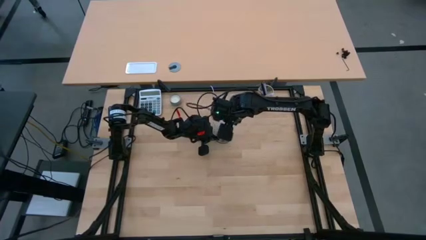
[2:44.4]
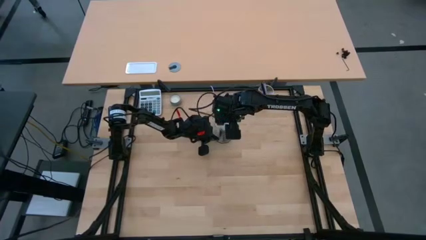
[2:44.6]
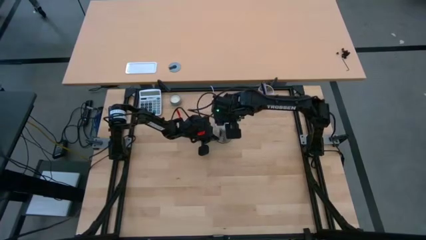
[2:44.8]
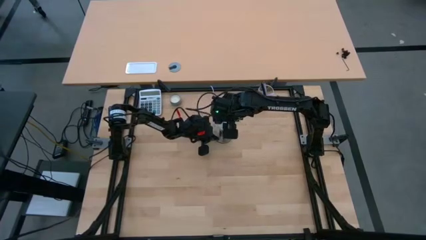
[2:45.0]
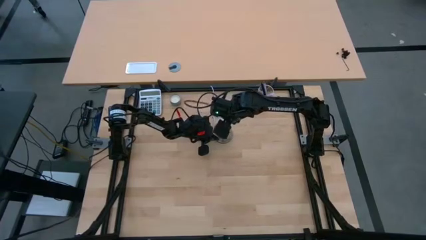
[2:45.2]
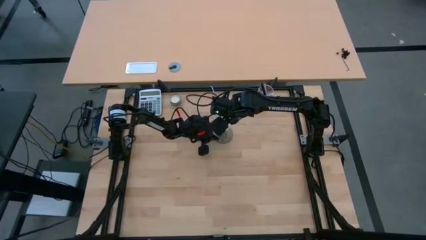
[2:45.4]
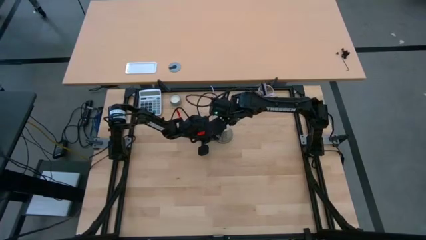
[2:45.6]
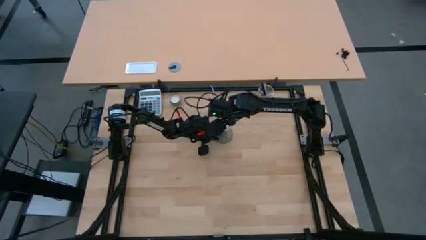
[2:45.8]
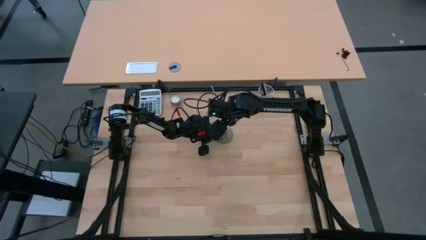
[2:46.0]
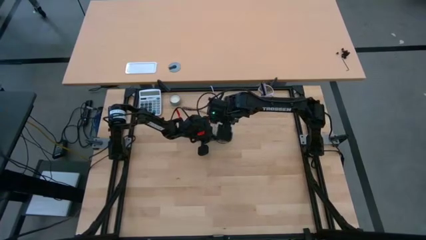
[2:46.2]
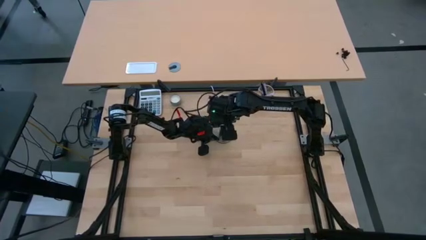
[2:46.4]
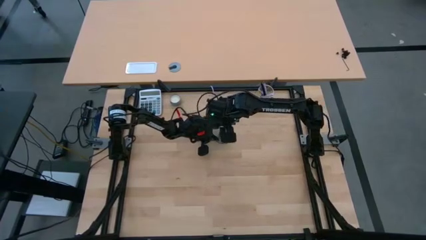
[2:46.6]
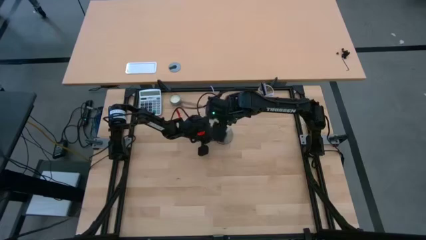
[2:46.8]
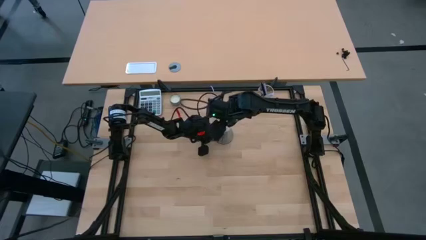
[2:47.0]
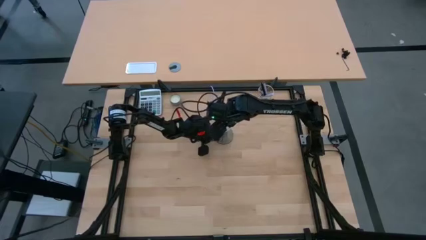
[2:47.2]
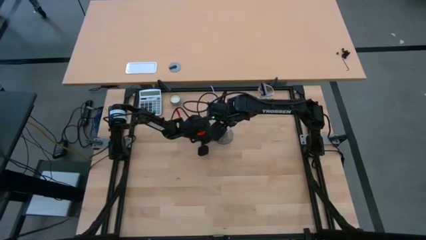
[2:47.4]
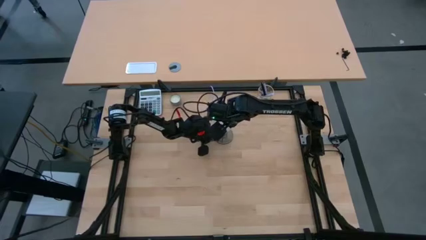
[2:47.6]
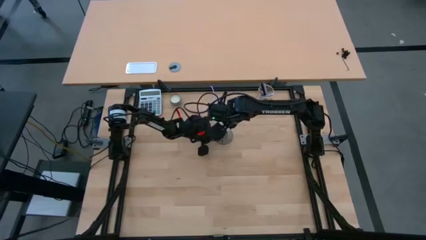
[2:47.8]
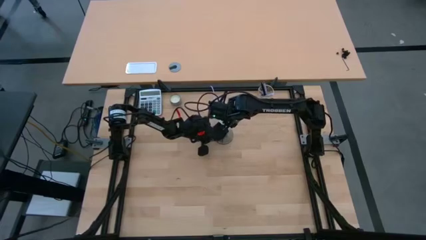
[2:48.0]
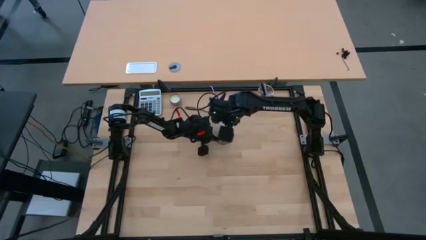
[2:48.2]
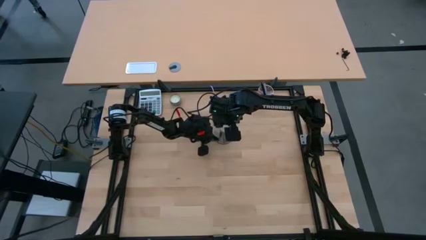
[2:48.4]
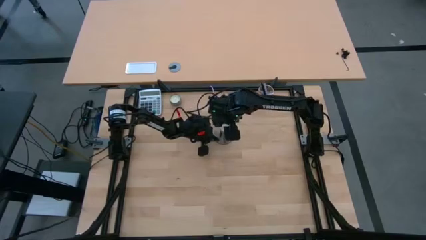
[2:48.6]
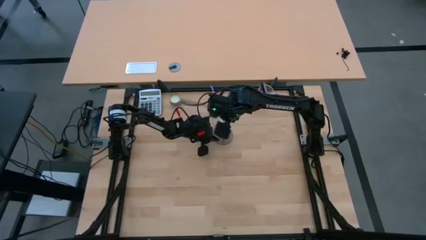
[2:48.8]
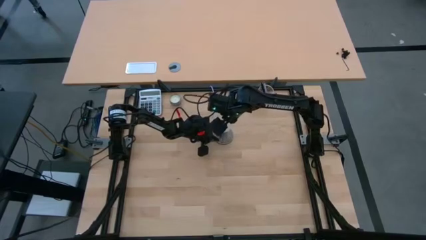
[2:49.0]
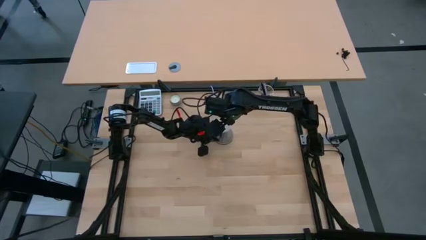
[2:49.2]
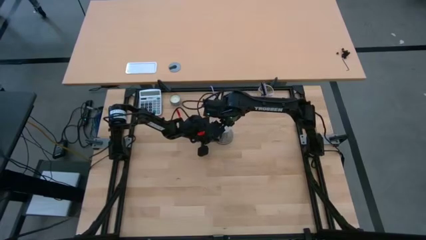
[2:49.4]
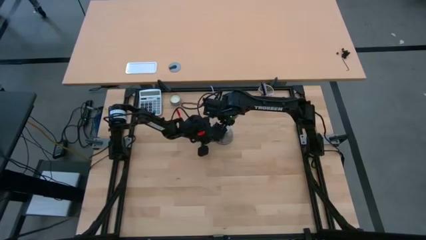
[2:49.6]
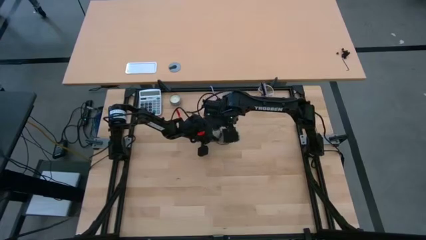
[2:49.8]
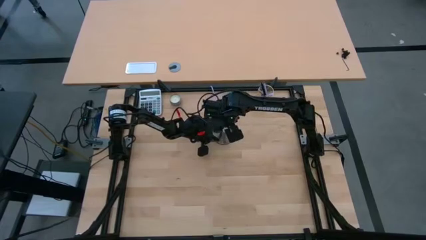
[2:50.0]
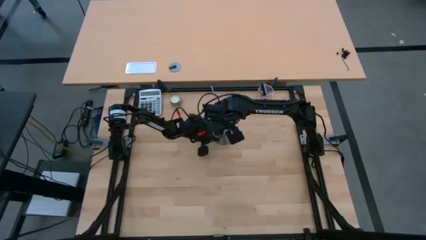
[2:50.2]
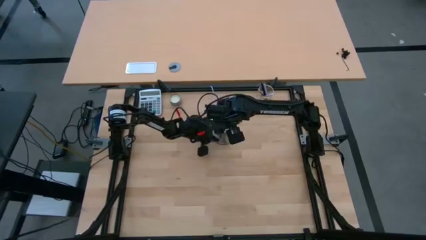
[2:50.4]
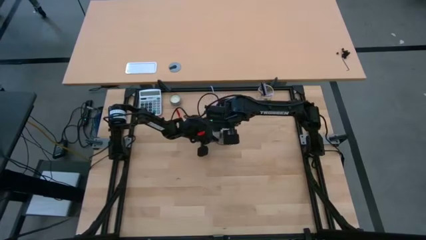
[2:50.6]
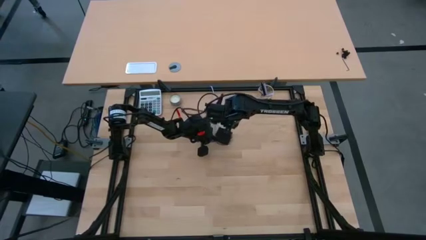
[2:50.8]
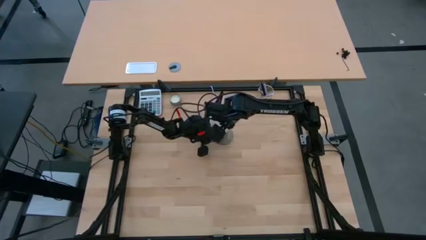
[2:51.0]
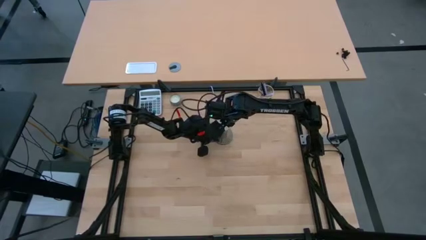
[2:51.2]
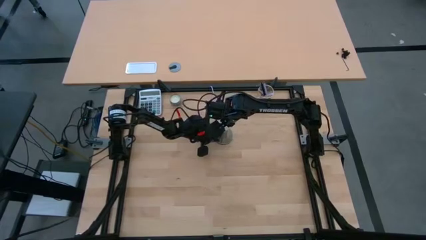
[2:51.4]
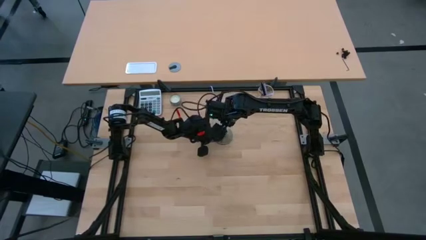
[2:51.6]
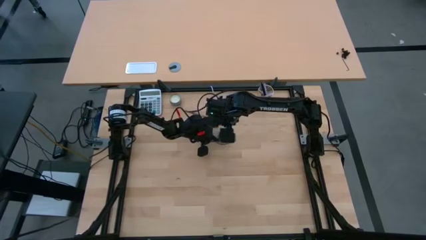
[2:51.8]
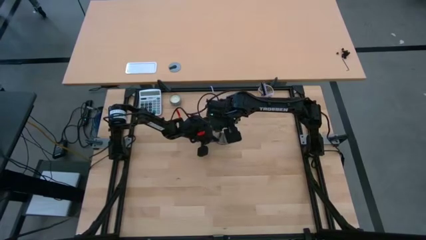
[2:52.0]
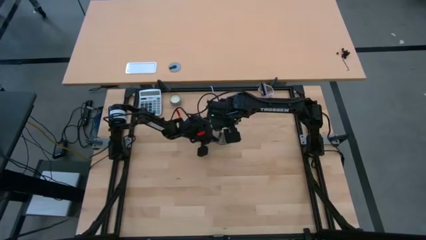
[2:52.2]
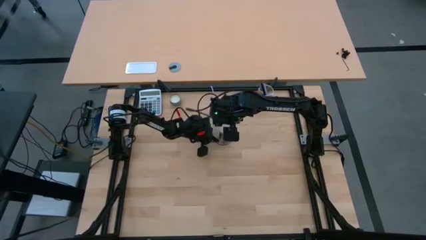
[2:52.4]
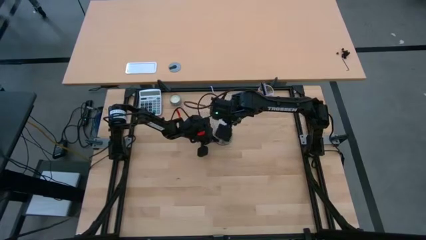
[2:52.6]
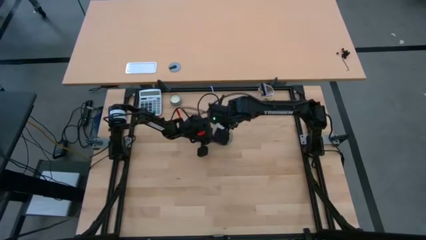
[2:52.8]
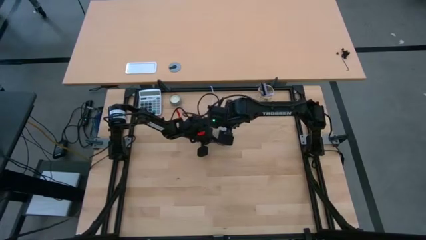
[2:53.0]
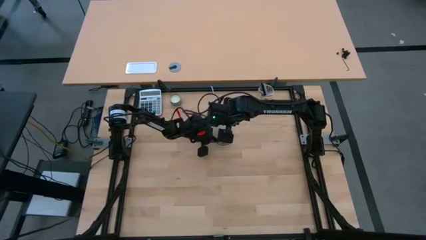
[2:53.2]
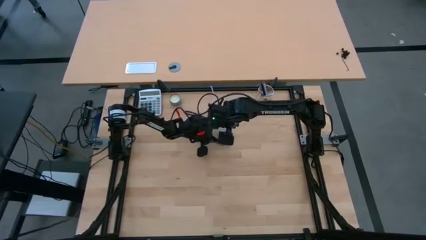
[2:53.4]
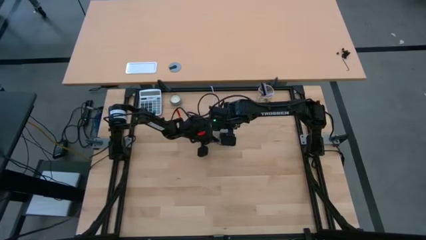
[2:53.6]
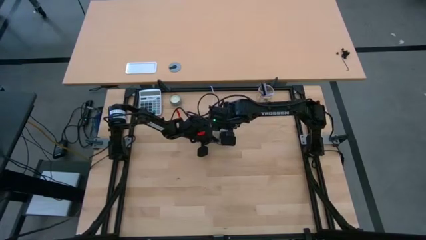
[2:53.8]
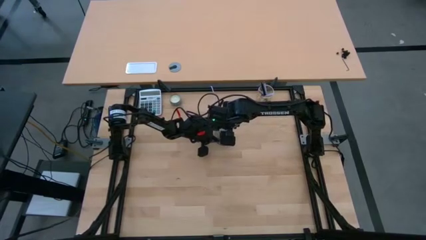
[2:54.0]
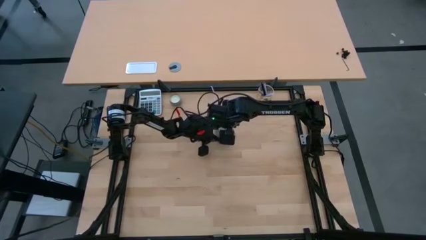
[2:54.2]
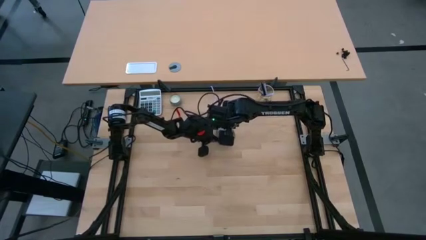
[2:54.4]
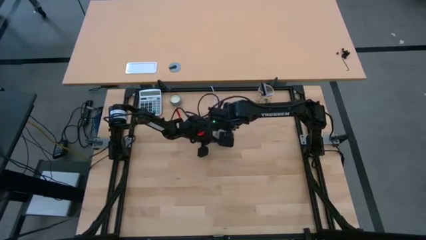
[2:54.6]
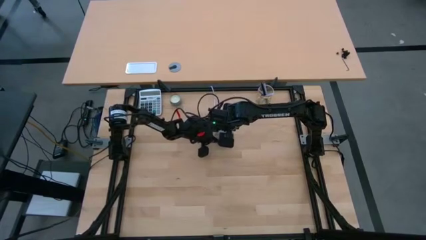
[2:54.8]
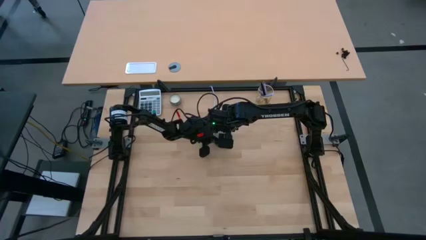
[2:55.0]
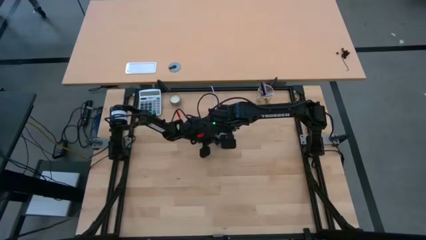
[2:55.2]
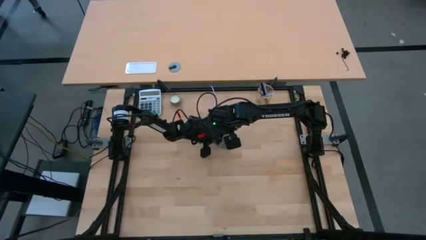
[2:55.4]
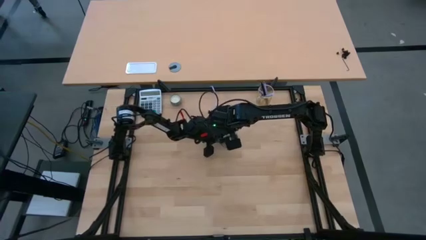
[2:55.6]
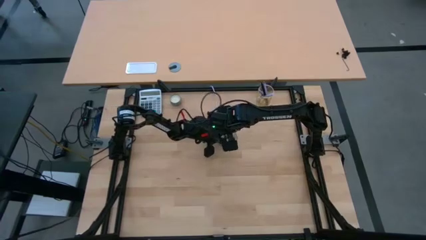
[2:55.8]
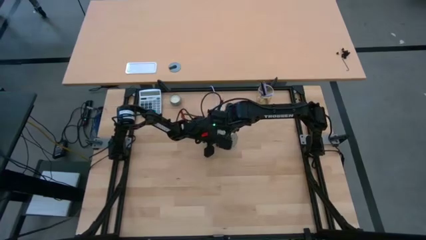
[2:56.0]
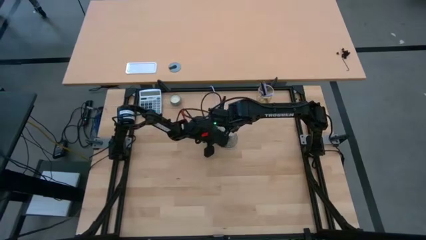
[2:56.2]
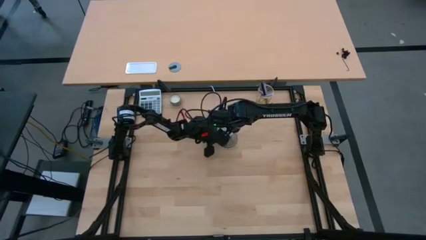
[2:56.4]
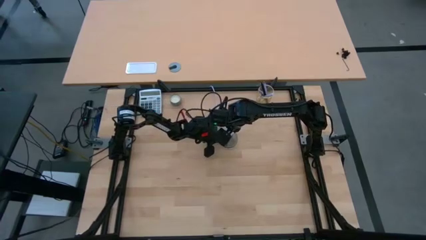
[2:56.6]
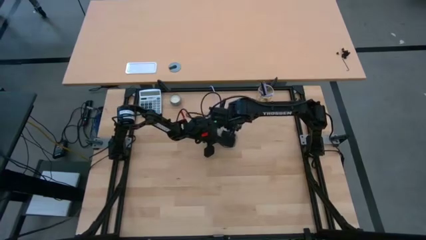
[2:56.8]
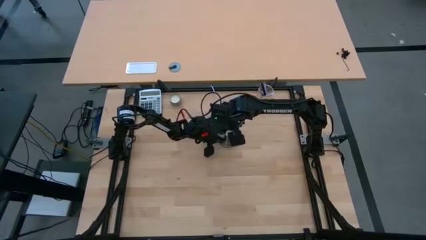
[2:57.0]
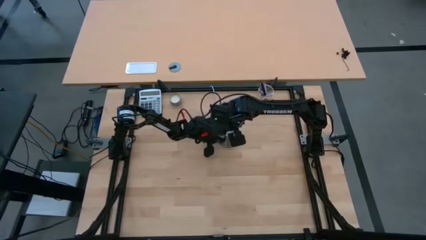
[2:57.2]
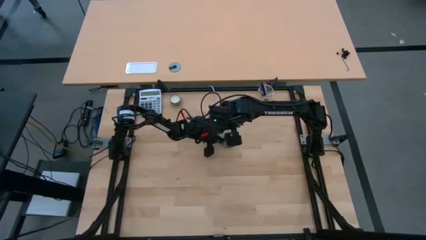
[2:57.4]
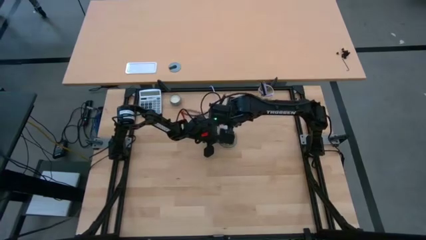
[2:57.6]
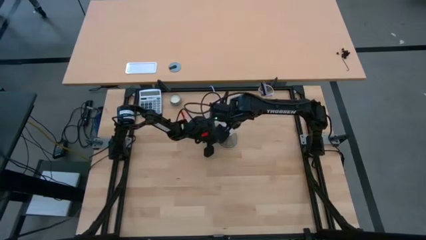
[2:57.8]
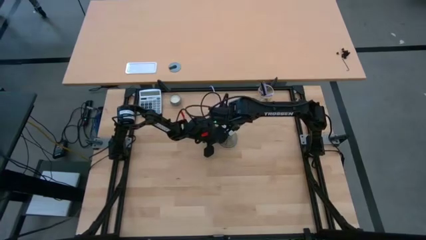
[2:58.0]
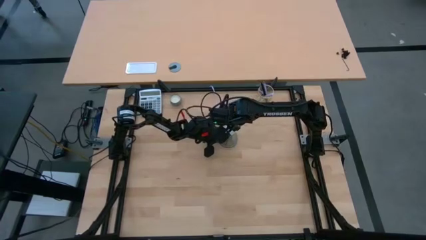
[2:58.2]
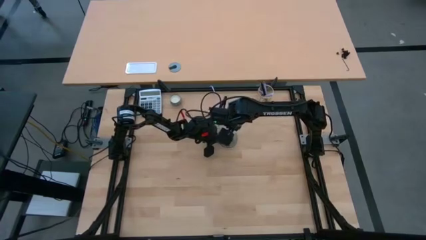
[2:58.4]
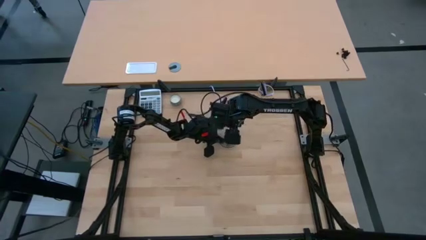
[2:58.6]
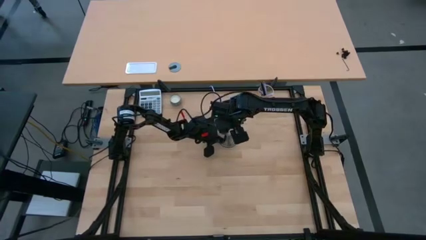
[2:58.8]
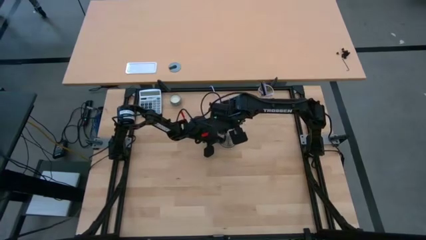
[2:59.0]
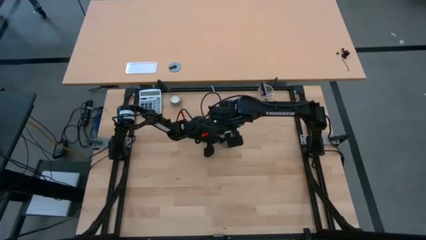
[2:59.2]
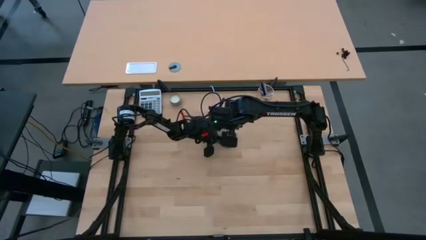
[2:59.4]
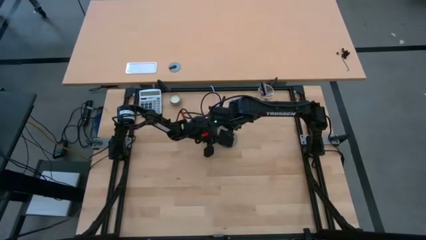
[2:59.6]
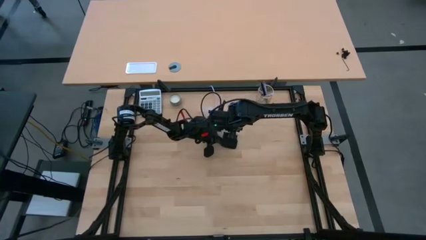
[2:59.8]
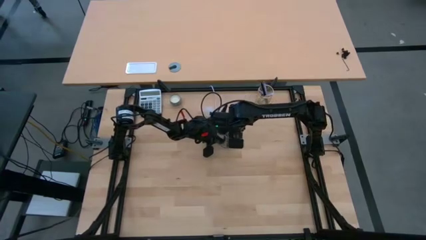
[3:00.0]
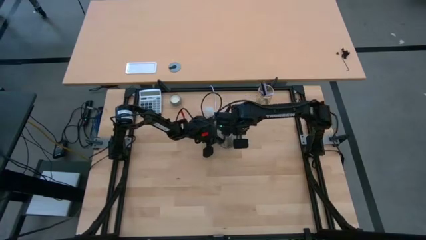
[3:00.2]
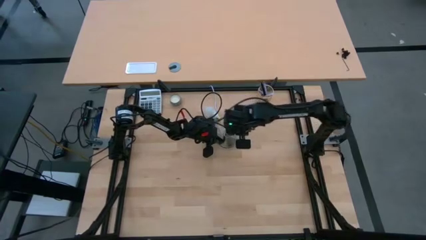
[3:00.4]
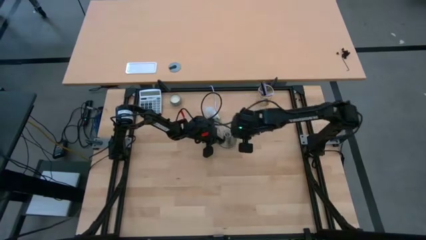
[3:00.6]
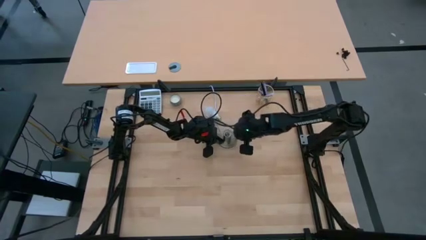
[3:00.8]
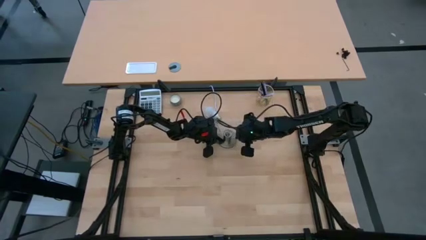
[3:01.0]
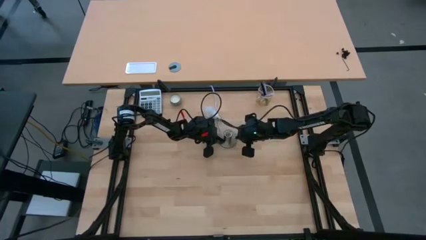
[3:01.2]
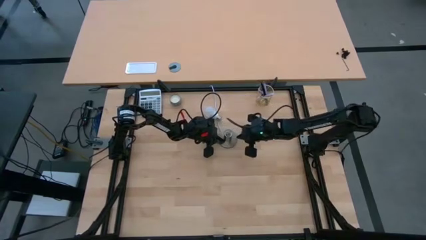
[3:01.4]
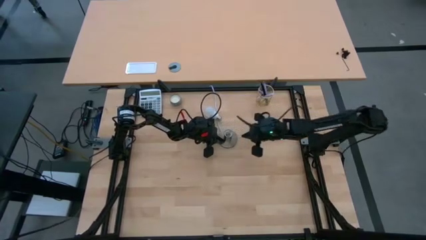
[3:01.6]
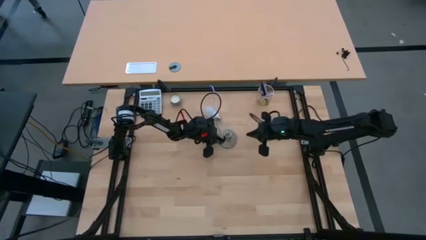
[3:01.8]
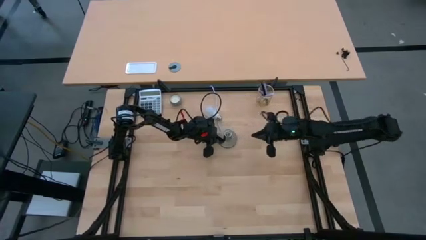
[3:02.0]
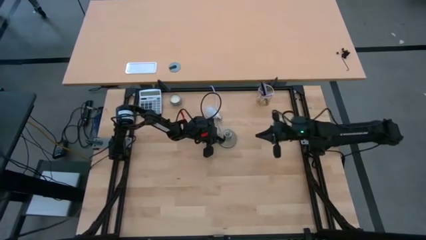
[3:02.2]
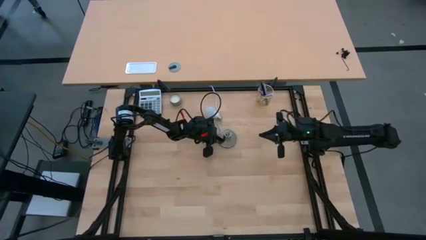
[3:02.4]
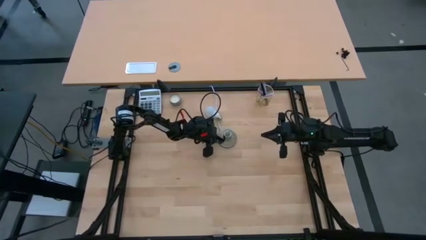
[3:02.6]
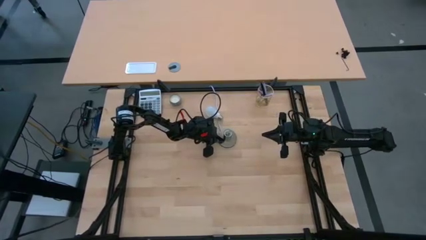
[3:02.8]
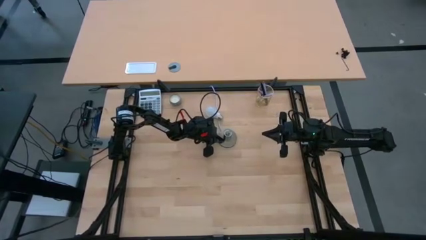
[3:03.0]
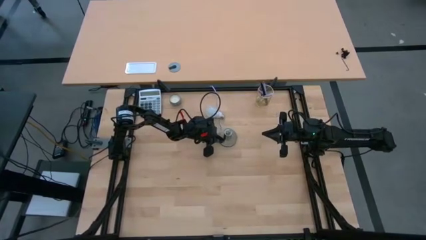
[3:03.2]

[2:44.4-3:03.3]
Task: Screw lightbulb
Remove the lightbulb from the lamp
